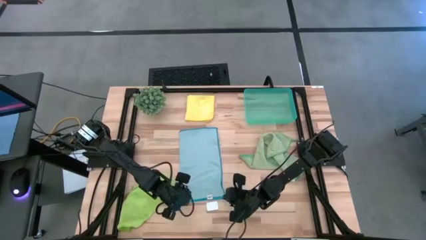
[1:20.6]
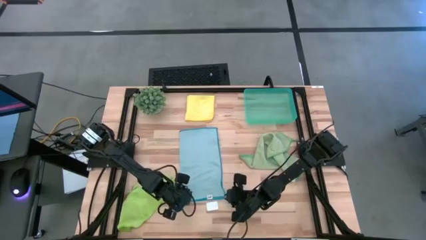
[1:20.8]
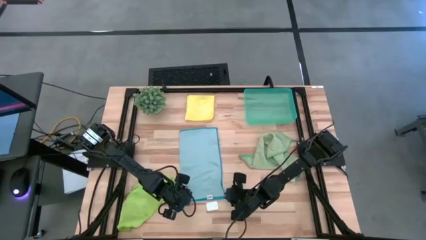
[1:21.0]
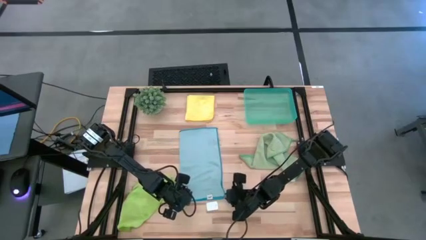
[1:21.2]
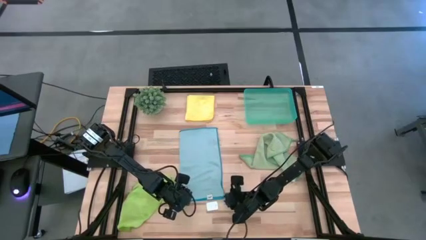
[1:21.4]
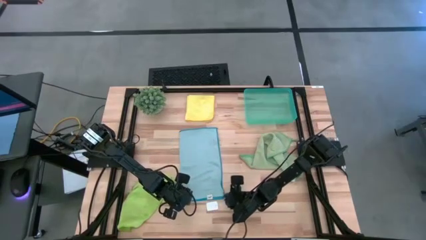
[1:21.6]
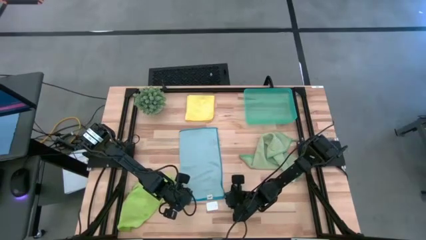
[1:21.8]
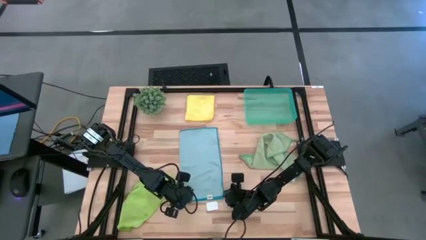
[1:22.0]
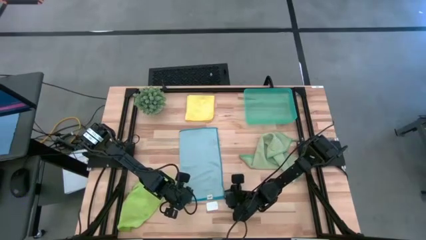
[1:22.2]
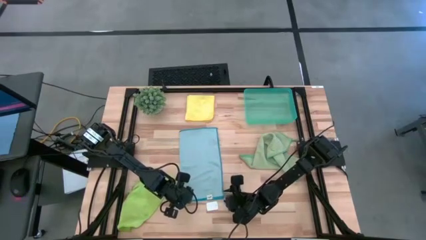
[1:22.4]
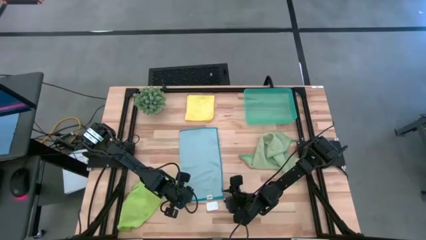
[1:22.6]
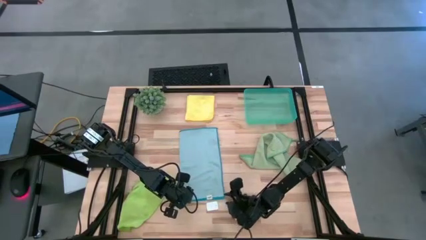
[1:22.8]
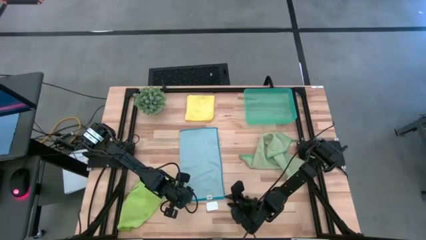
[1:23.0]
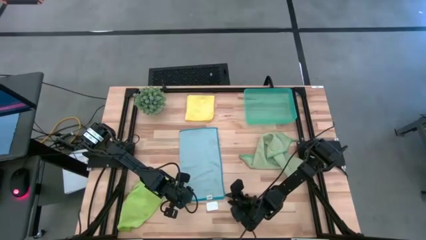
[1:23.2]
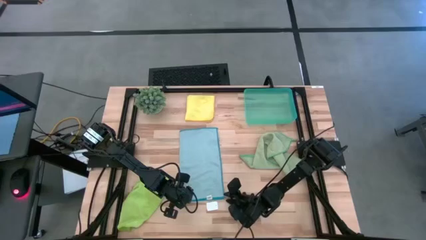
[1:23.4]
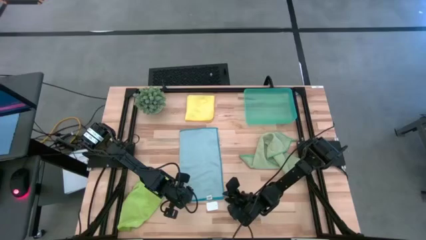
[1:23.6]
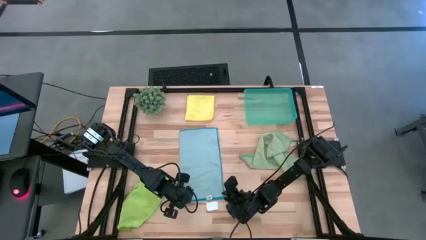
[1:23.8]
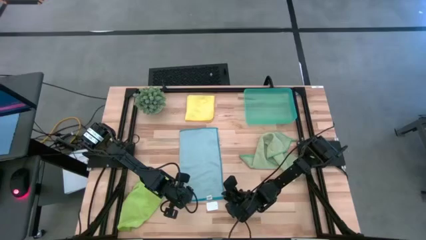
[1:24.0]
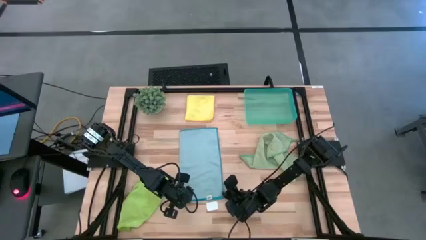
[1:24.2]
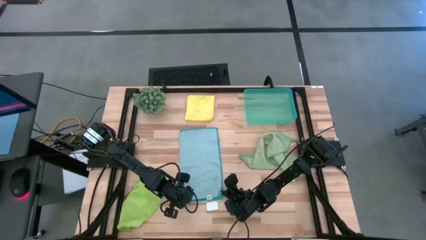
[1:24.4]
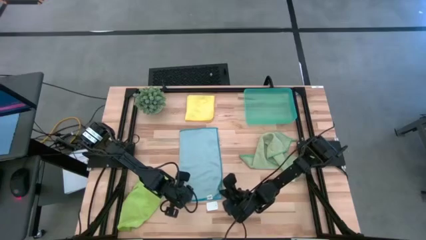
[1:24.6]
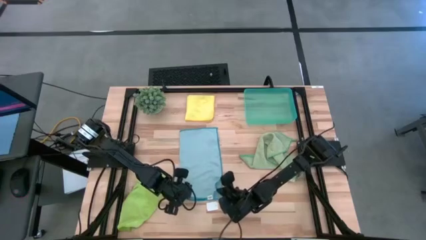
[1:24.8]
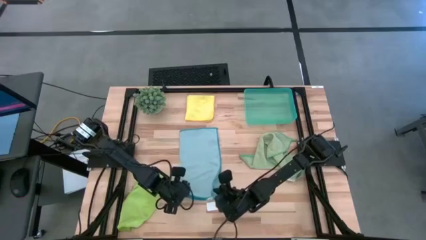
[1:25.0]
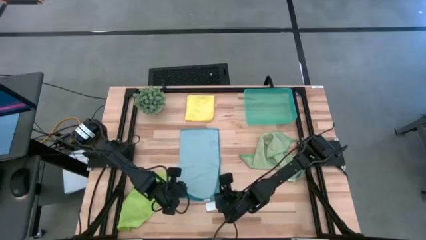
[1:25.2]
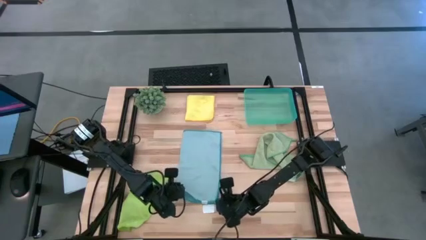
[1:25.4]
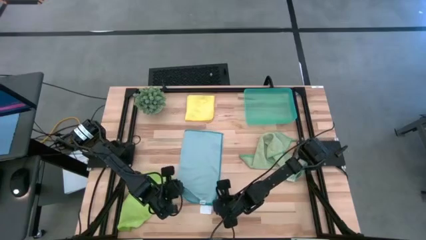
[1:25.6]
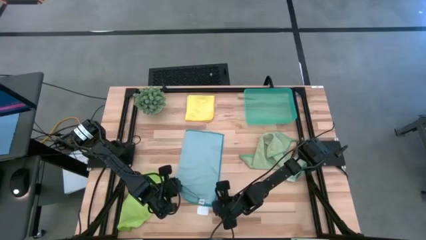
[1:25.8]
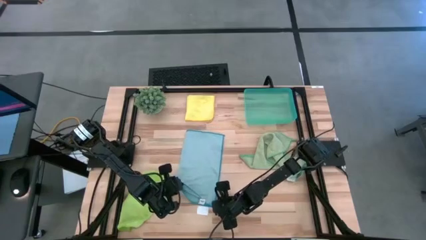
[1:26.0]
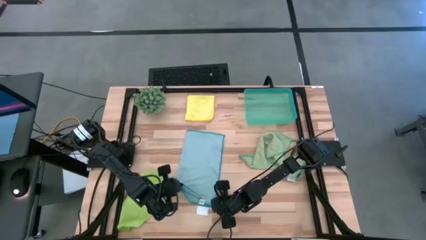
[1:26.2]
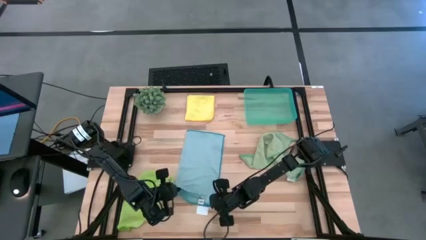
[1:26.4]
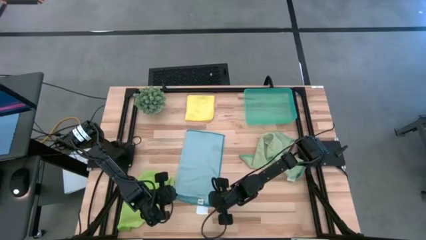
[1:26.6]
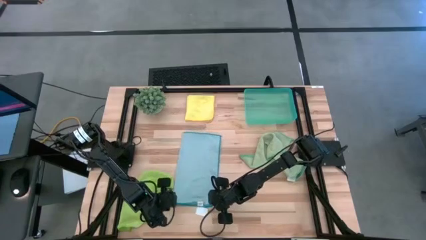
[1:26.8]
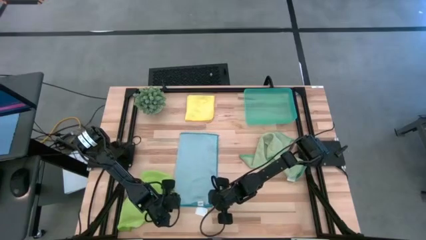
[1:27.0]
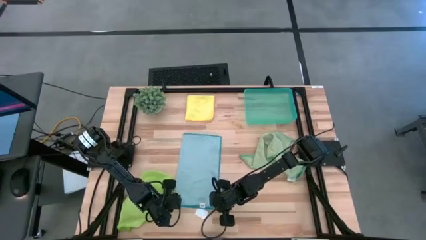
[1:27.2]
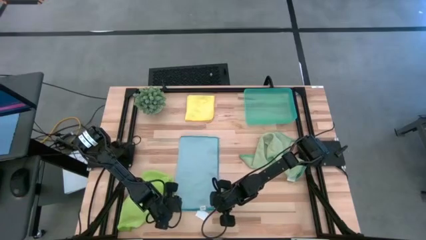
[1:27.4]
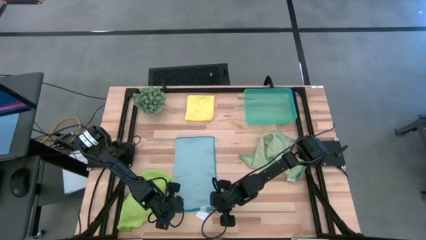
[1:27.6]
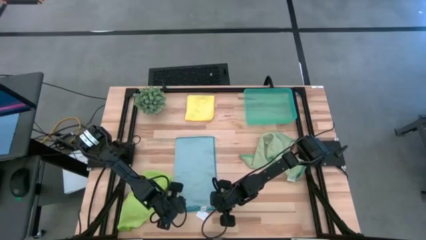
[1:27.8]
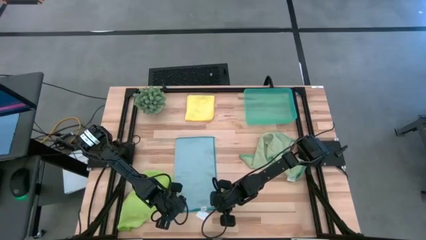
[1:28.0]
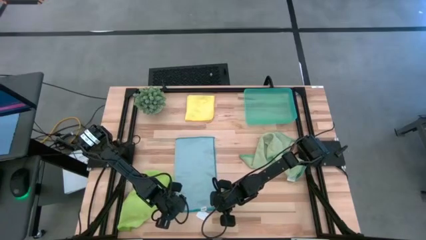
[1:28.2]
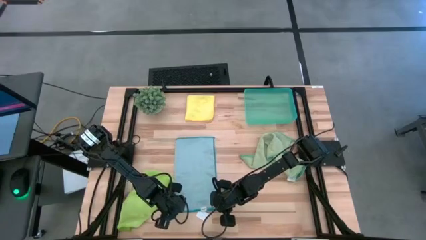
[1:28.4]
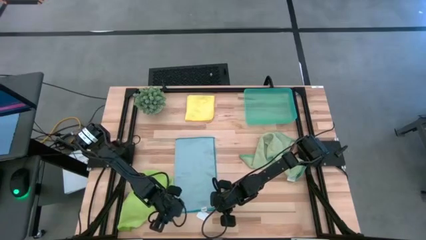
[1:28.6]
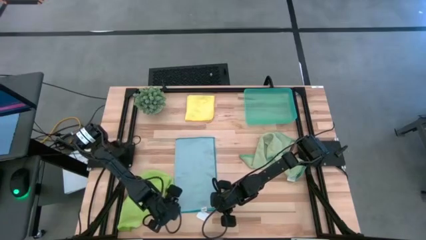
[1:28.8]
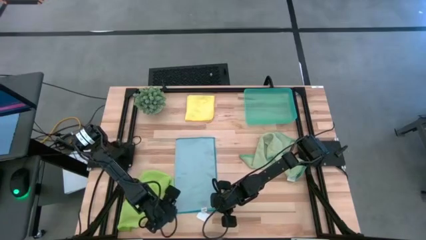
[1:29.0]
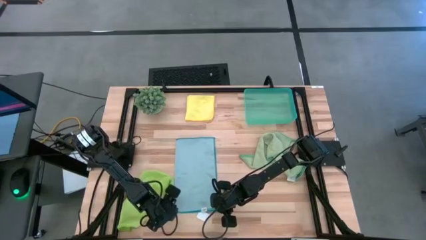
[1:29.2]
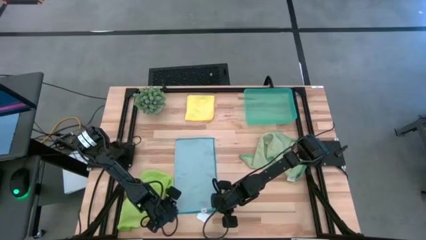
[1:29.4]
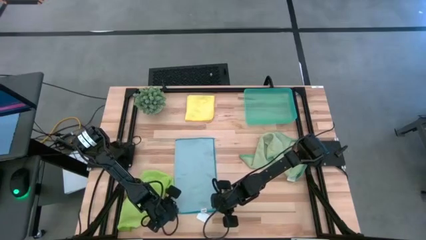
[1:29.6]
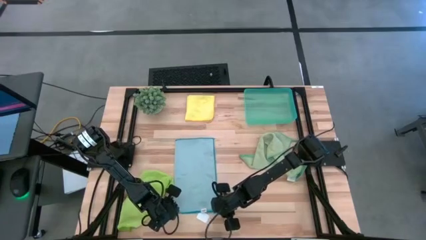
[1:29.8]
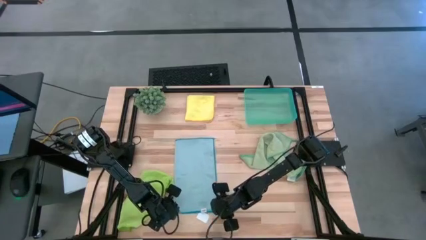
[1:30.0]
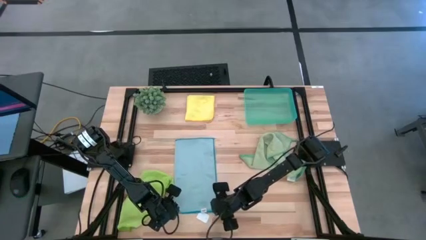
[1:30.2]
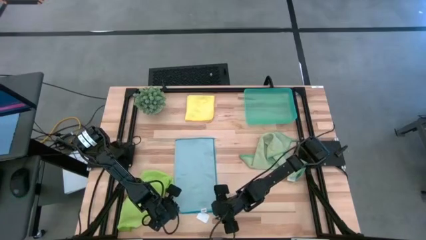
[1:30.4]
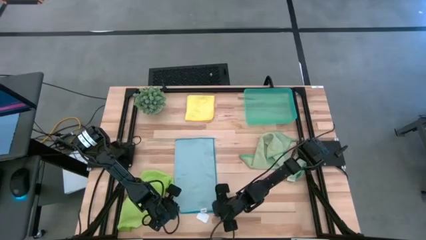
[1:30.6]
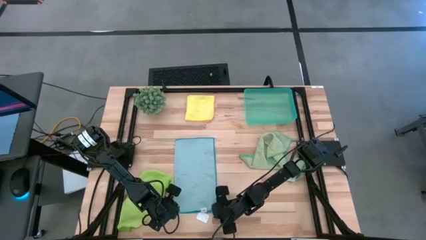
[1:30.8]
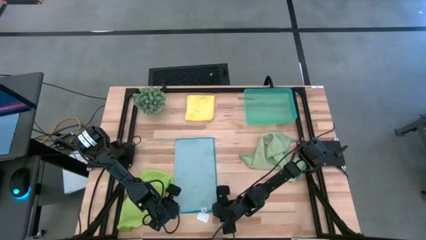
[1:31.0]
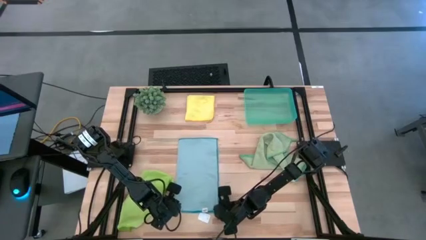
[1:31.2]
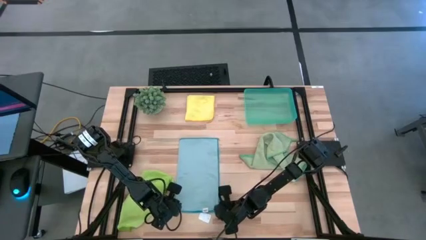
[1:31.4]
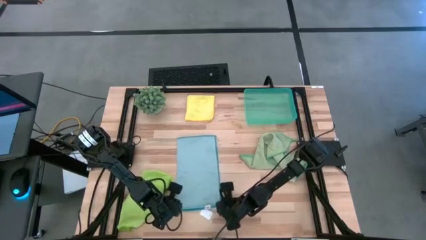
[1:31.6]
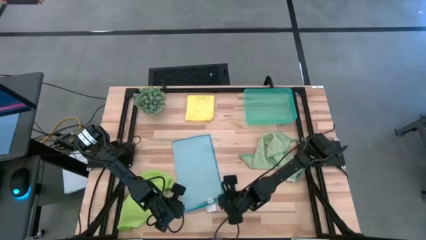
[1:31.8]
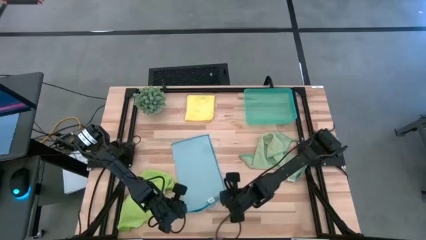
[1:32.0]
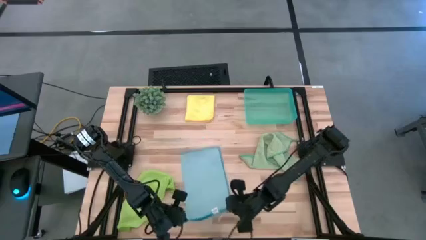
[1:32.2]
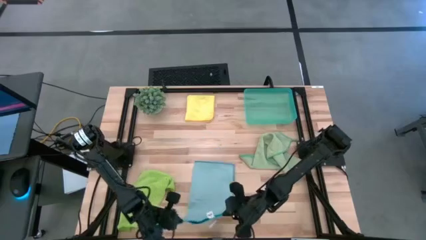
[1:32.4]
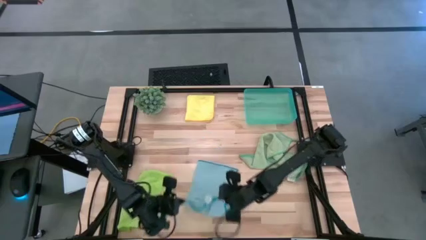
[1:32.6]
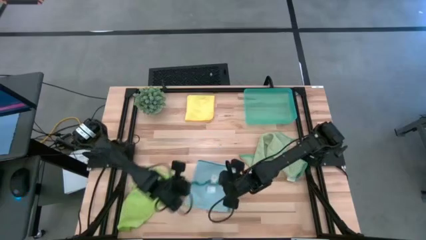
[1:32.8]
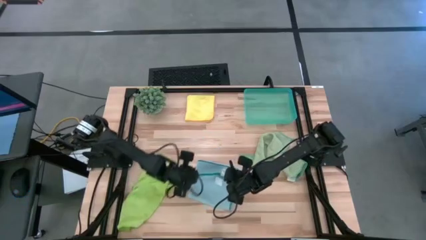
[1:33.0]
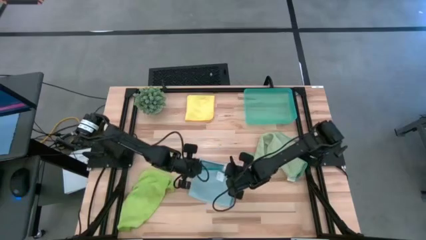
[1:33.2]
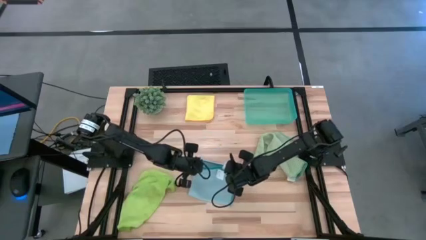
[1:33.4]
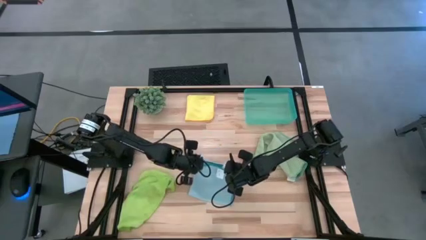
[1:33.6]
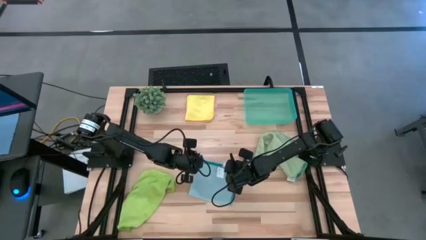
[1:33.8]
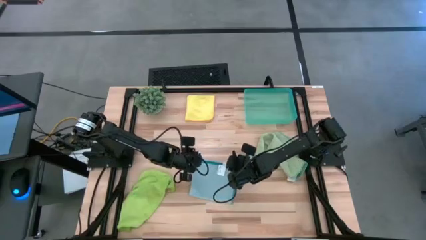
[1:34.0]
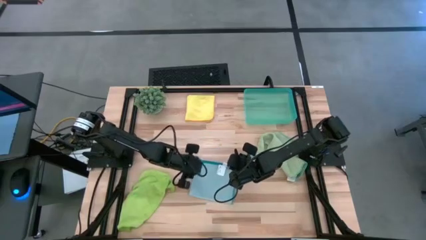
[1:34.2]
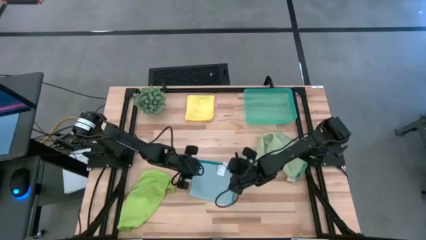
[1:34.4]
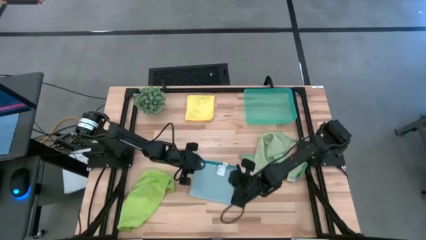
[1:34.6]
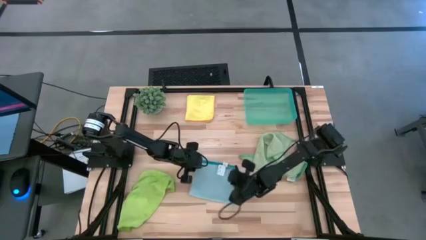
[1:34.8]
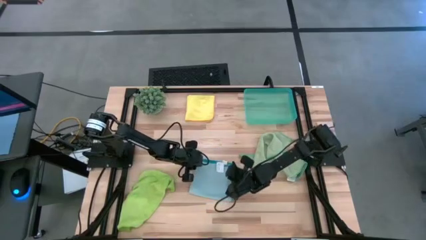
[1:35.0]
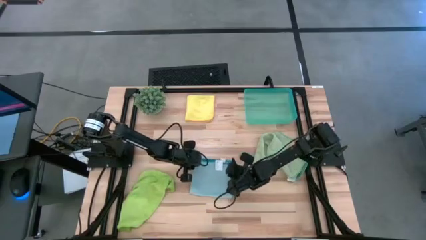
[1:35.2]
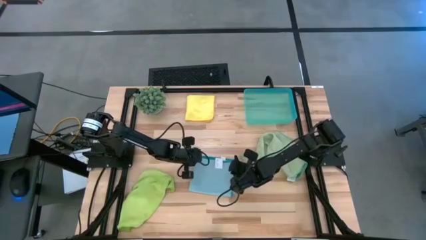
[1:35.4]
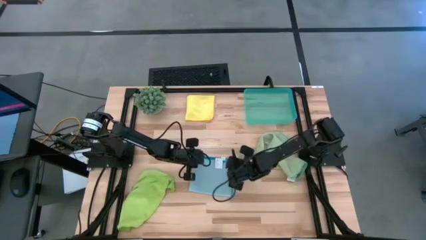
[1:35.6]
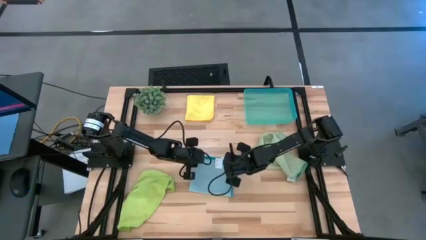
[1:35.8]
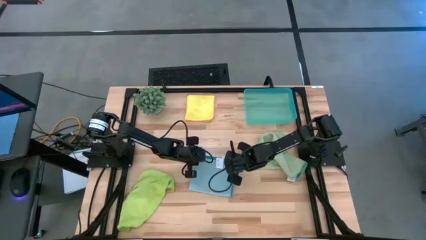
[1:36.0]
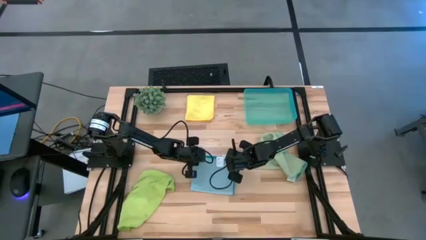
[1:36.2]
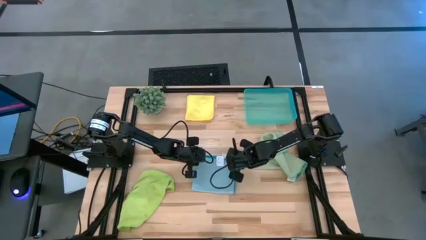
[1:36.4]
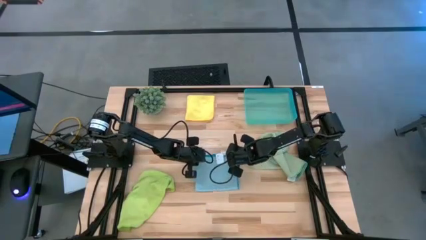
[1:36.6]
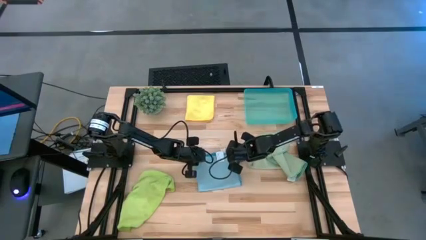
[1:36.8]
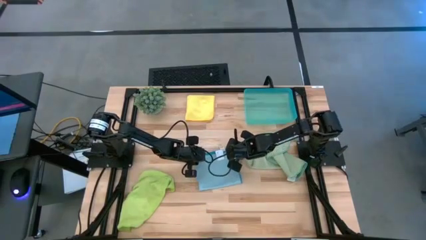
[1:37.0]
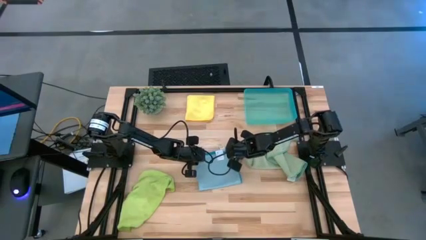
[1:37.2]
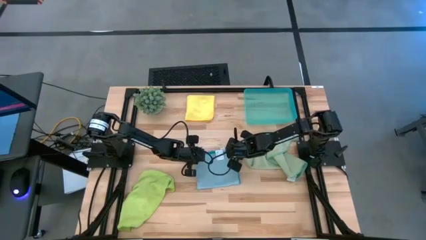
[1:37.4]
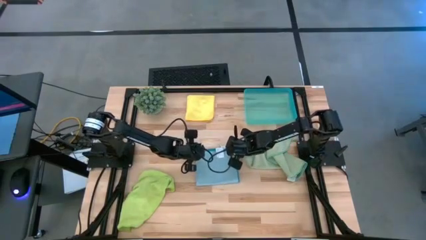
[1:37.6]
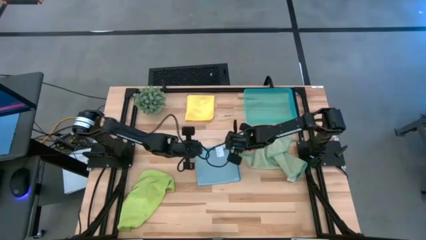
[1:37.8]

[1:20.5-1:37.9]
Task: Fold microfiber towels
Fold the blue microfiber cloth
